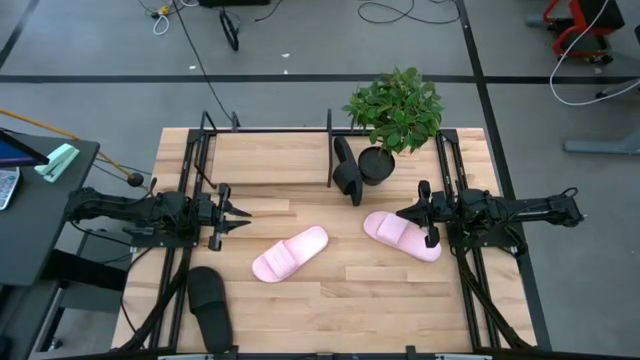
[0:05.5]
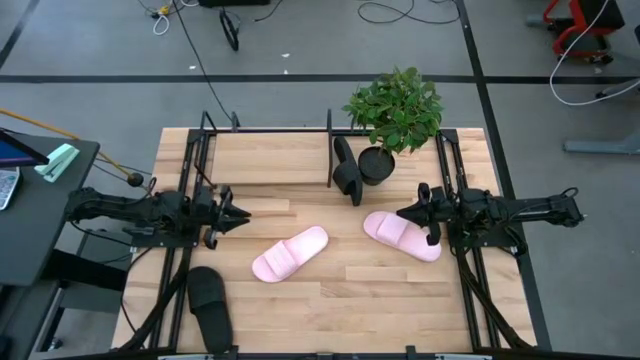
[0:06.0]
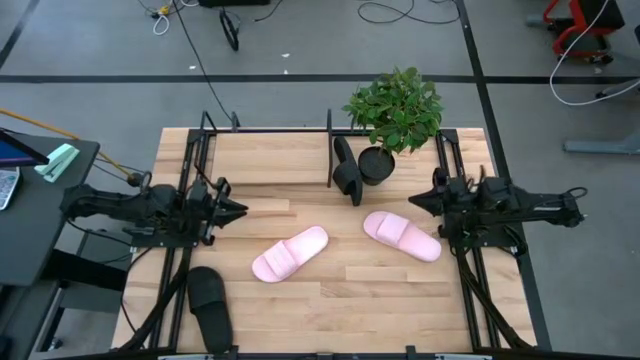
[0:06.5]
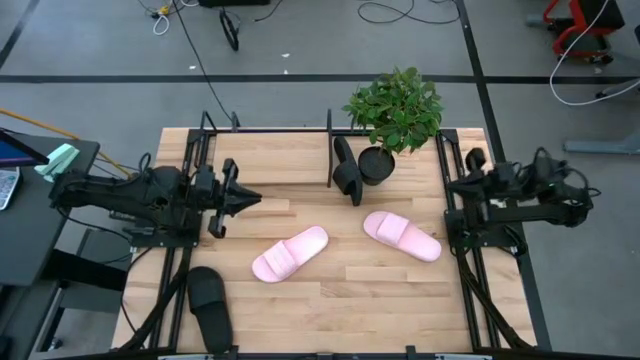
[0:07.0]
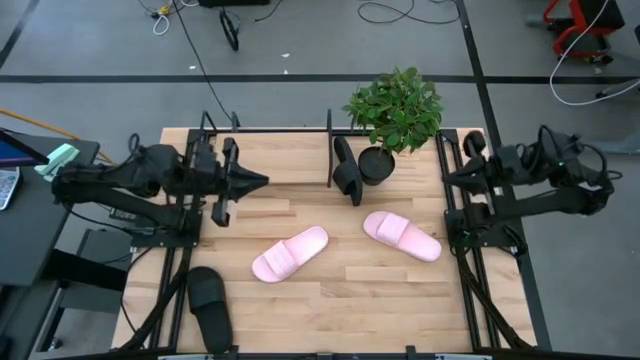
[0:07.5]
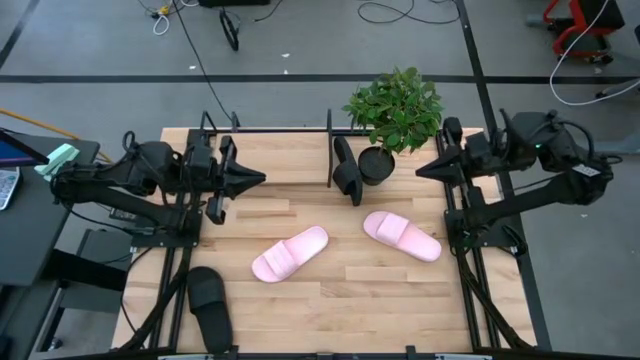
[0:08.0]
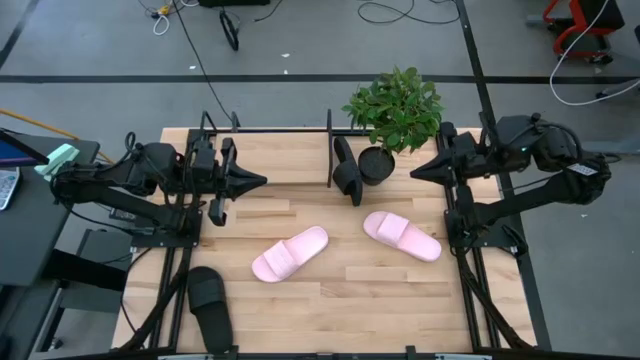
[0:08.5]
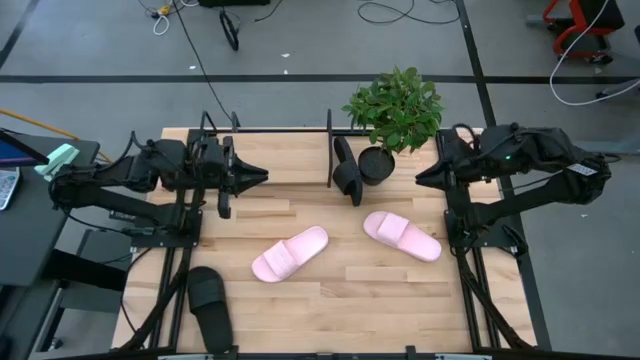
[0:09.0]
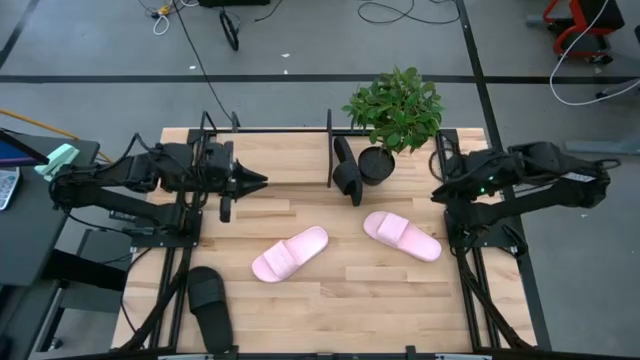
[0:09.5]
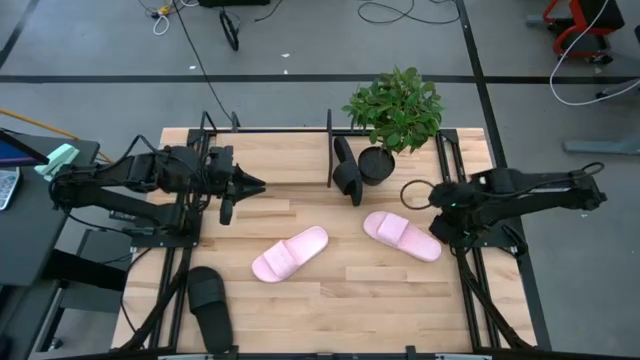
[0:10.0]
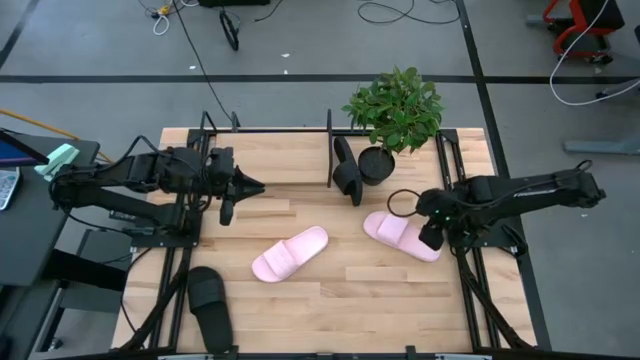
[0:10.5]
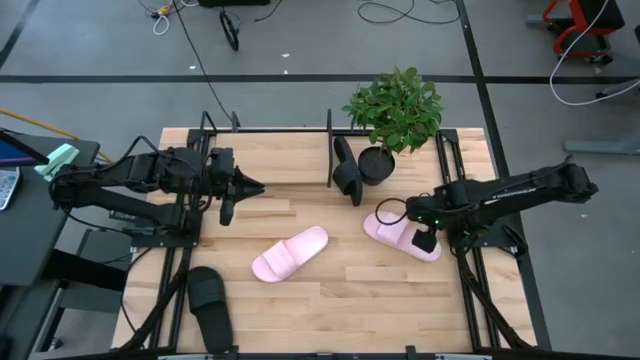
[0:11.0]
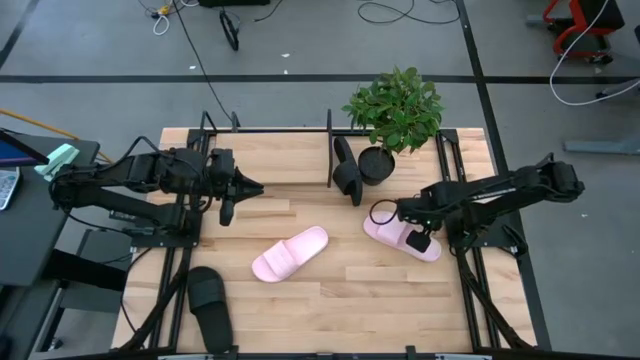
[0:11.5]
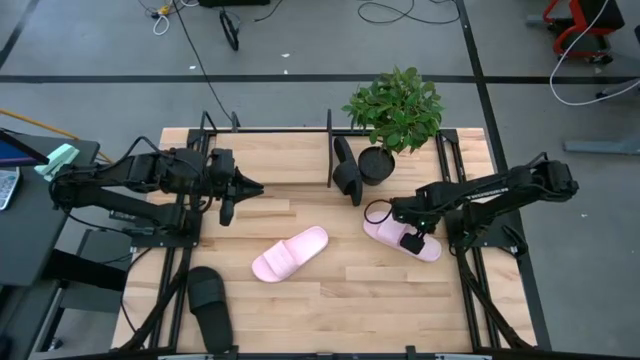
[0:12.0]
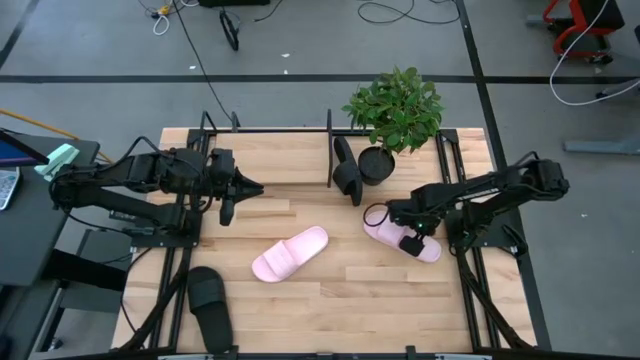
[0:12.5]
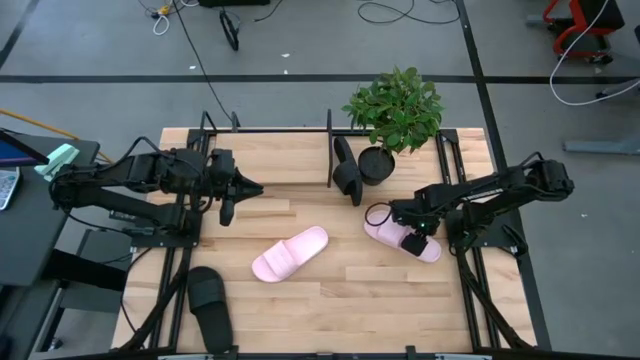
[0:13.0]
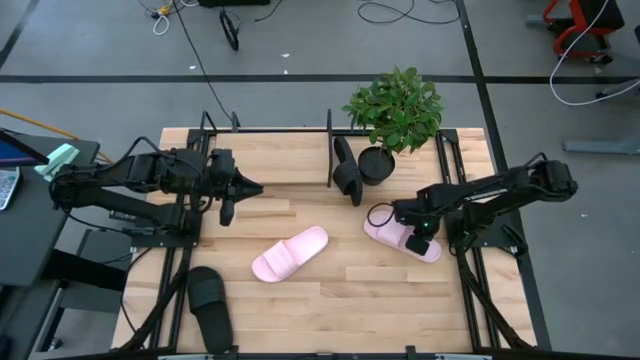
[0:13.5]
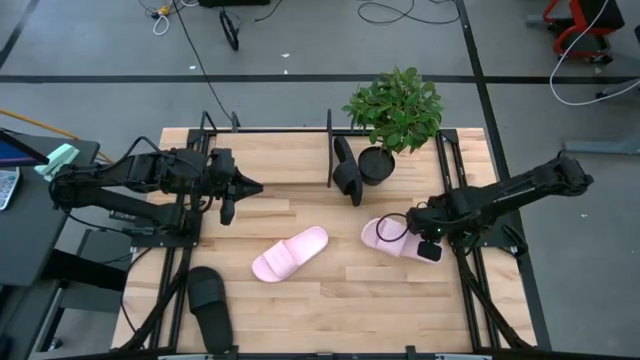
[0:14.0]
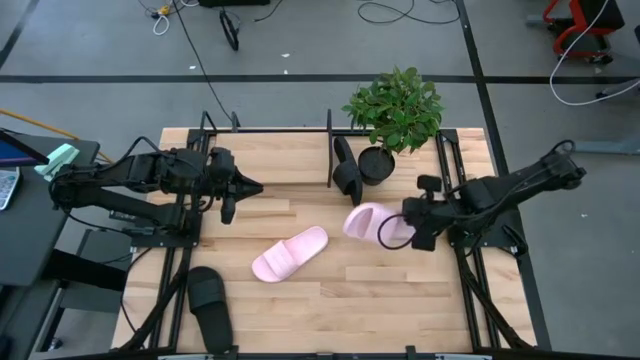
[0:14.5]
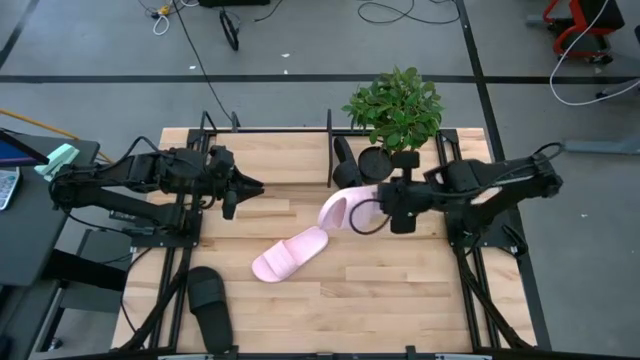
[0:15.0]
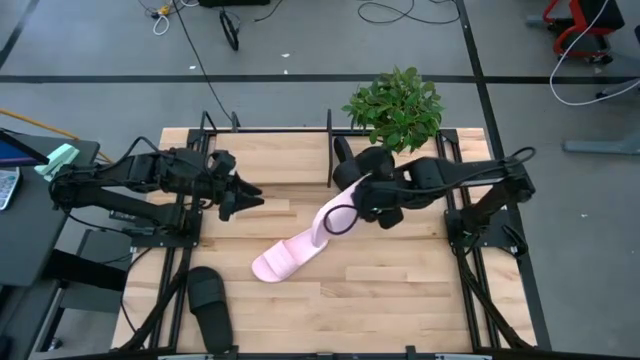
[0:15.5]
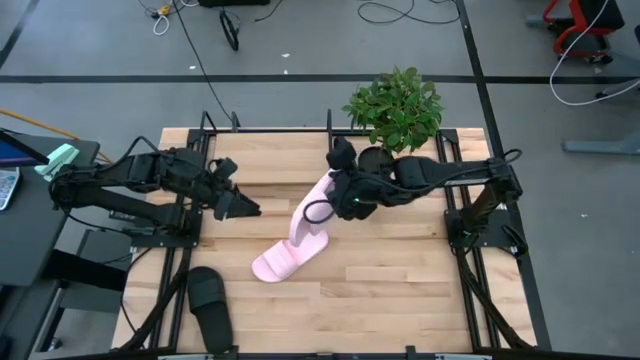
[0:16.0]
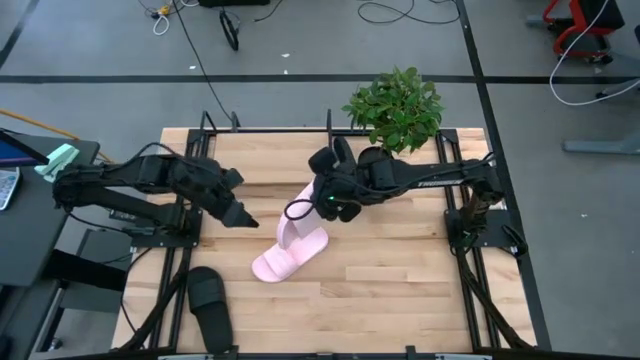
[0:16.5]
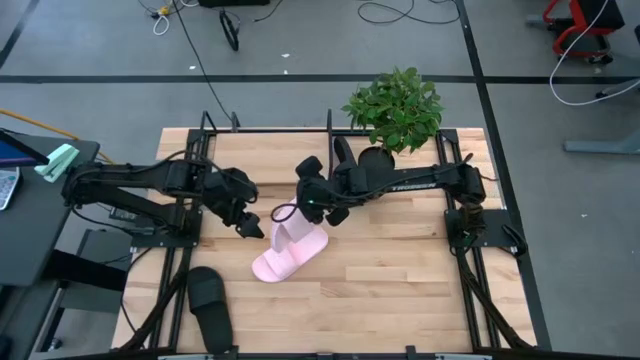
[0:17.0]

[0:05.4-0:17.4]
Task: Pick and place slides into the shelf
Put the right pink slide on the shelf

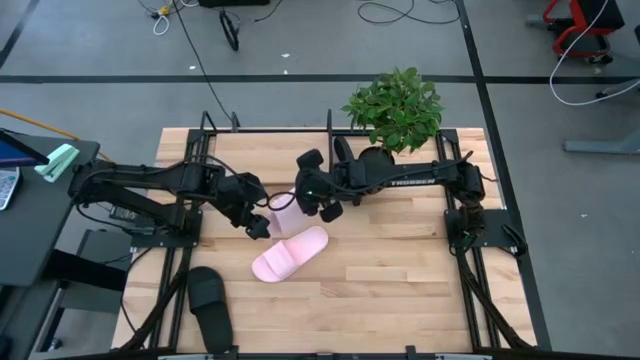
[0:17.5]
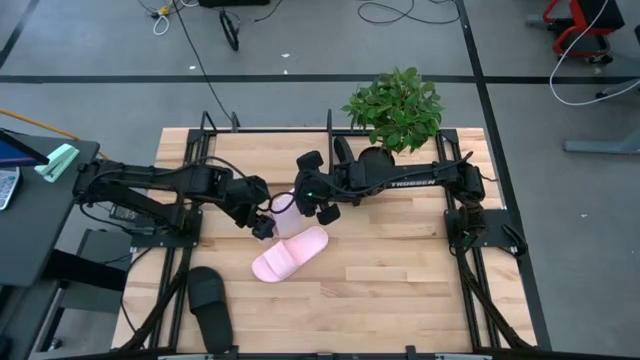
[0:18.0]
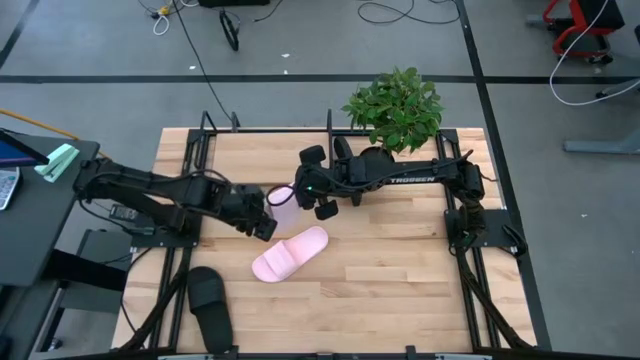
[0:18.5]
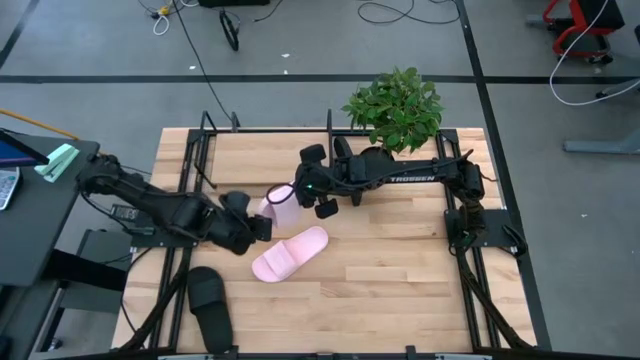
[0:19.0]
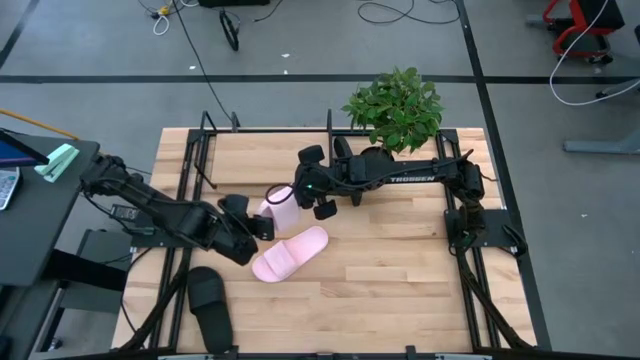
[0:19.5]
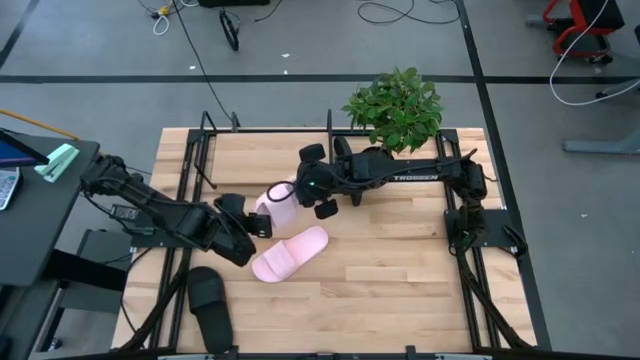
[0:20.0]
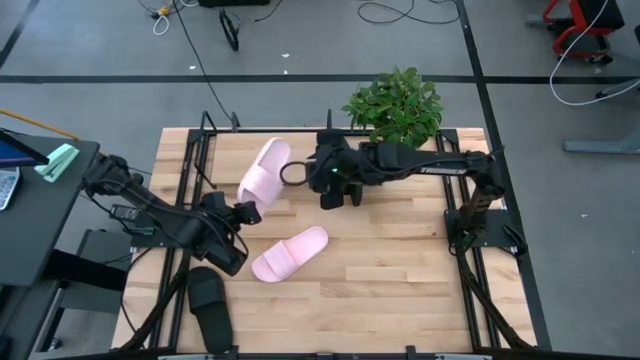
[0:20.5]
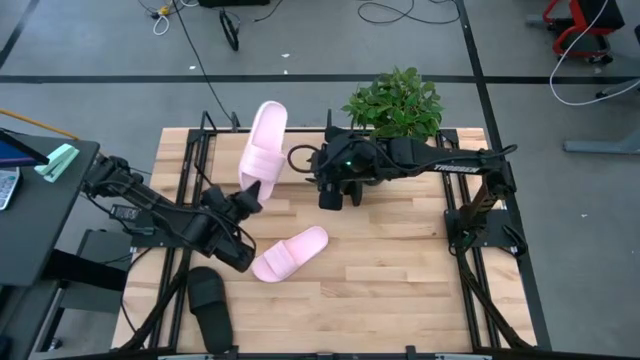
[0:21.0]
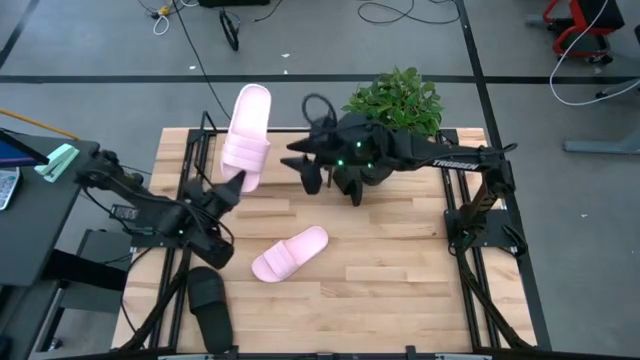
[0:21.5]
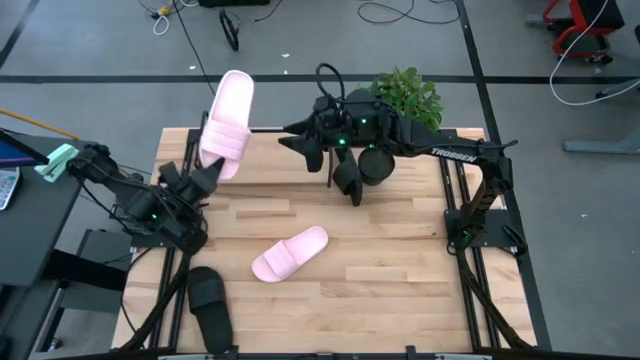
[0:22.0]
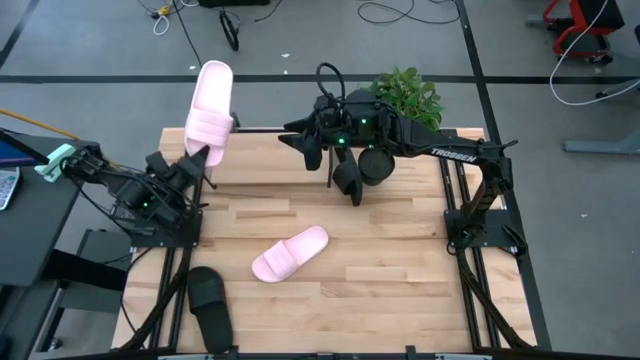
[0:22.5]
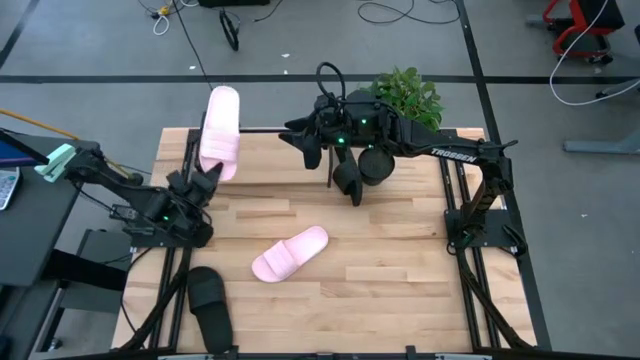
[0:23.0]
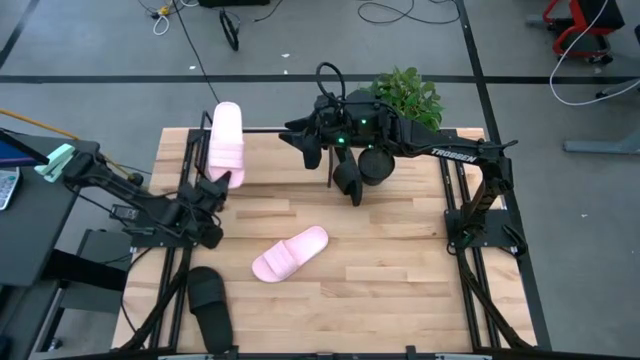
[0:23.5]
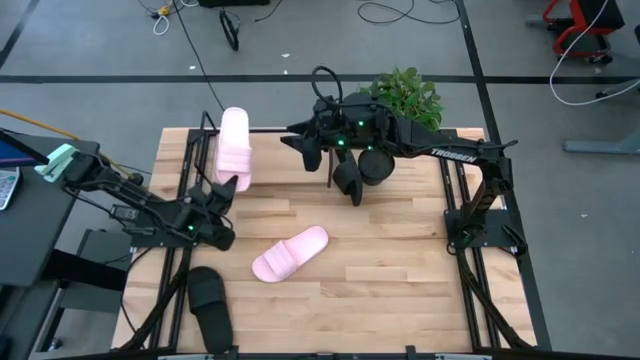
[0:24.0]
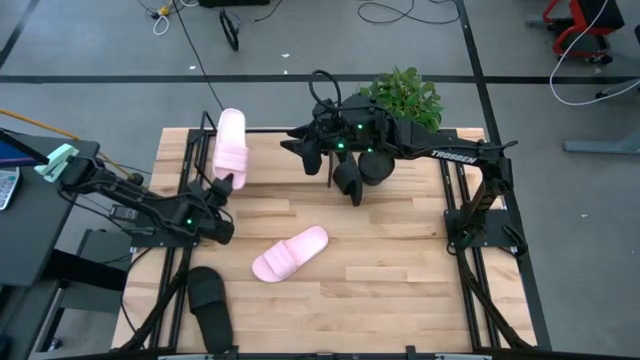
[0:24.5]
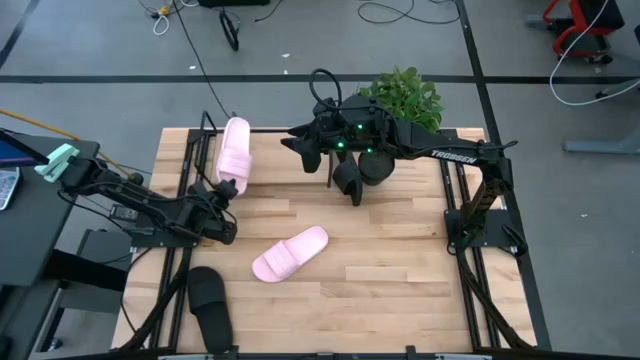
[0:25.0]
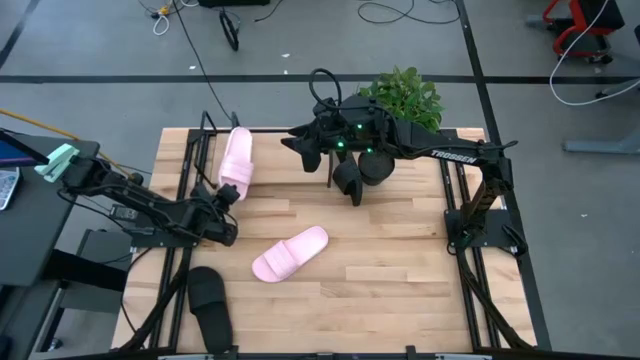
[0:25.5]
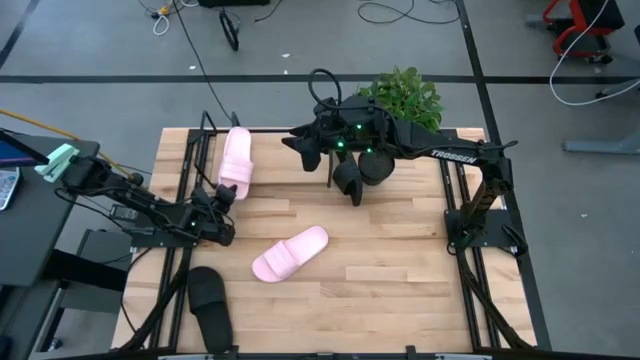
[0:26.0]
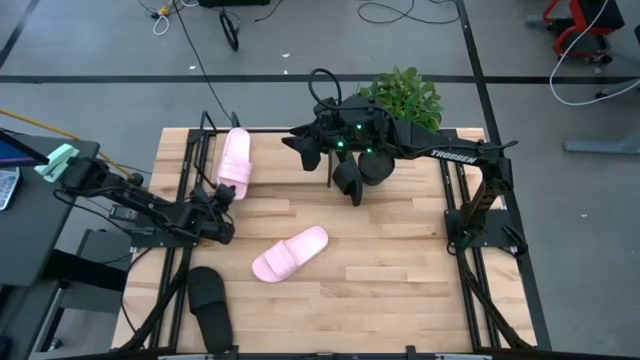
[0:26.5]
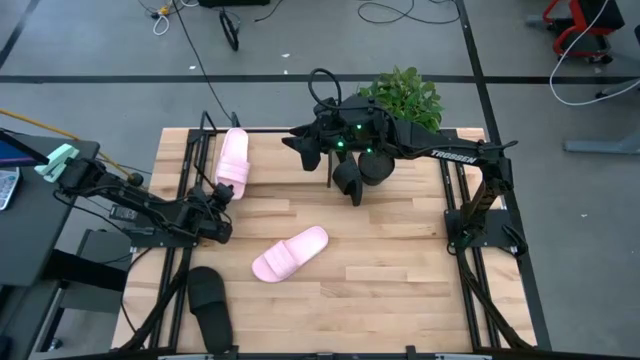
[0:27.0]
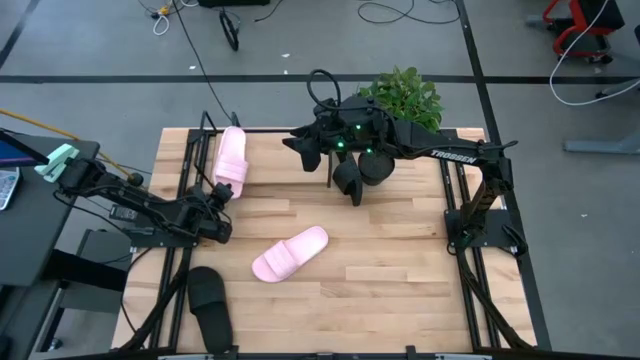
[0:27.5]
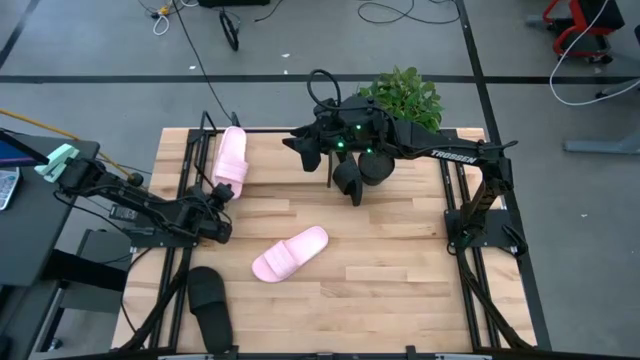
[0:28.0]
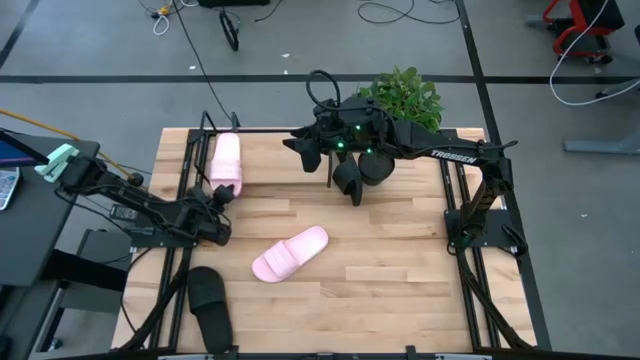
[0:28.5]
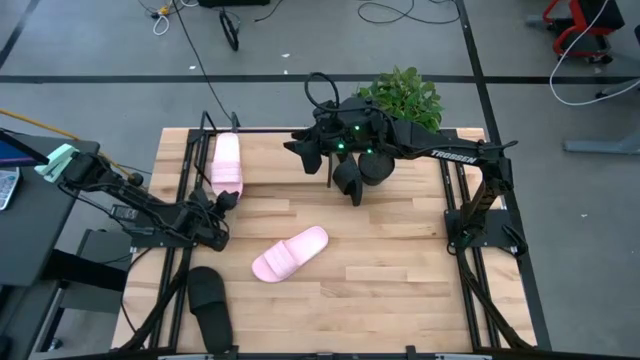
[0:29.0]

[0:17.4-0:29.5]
Put the right pink slide on the shelf
